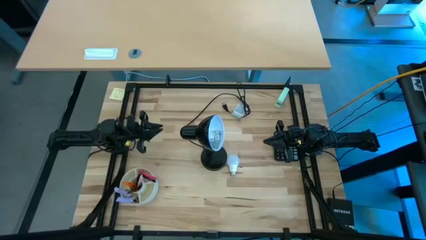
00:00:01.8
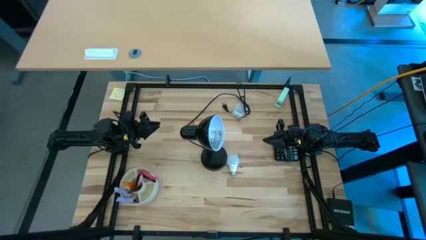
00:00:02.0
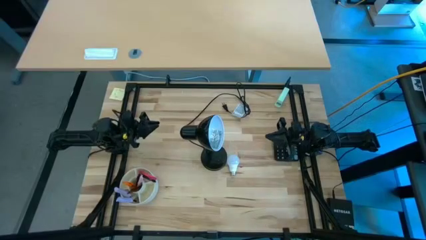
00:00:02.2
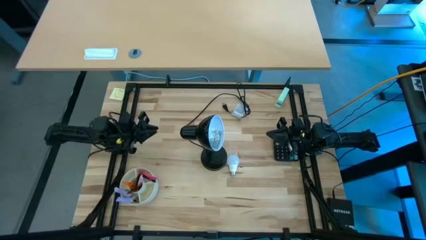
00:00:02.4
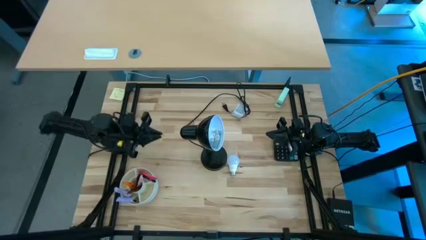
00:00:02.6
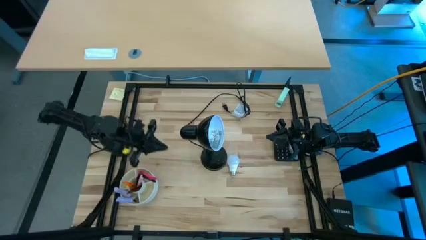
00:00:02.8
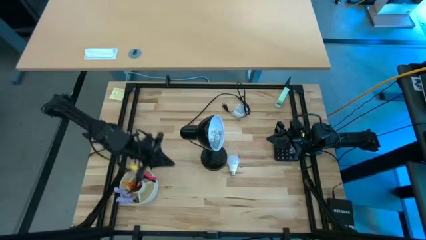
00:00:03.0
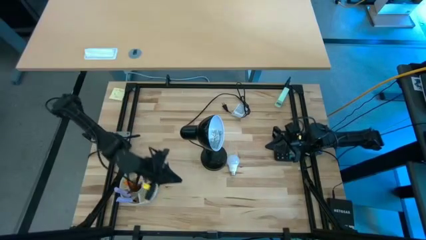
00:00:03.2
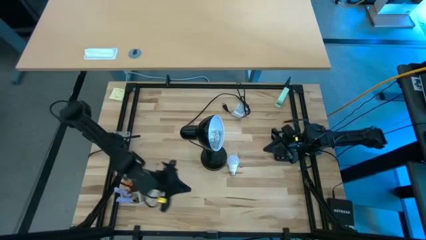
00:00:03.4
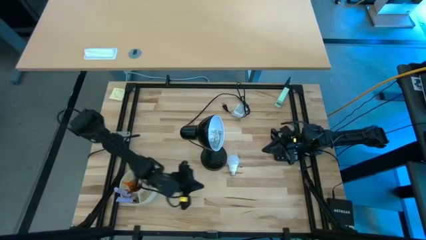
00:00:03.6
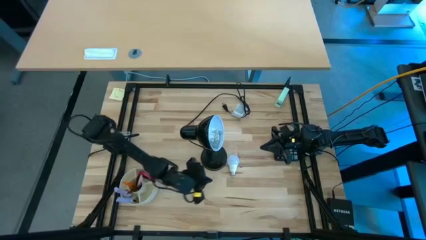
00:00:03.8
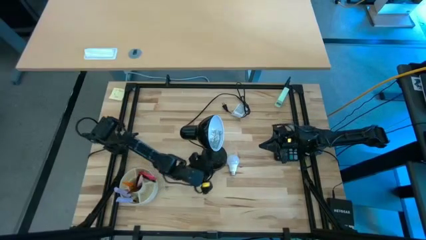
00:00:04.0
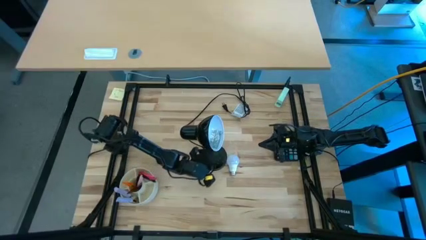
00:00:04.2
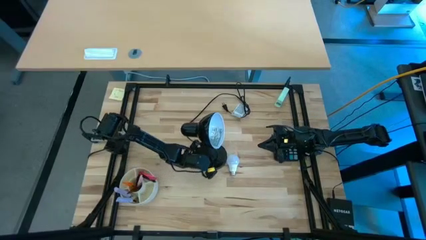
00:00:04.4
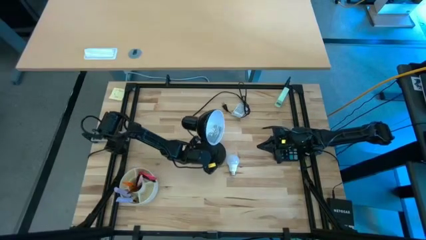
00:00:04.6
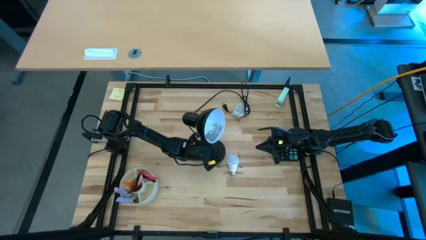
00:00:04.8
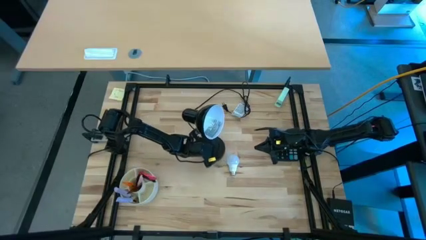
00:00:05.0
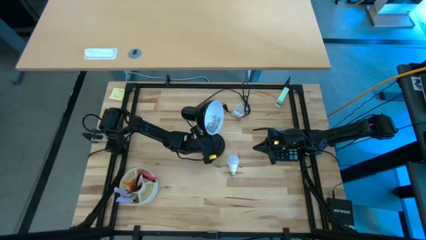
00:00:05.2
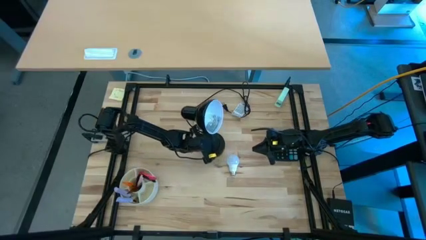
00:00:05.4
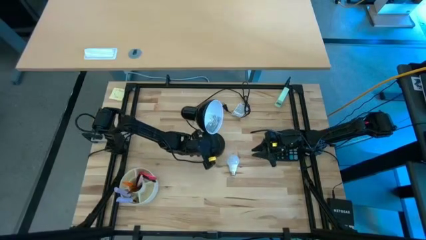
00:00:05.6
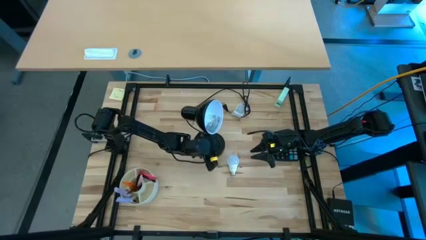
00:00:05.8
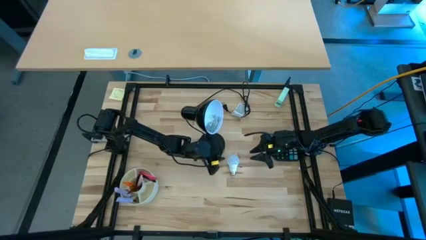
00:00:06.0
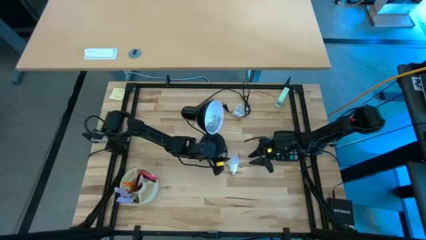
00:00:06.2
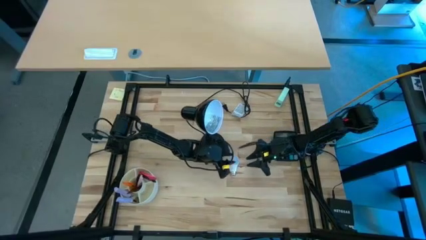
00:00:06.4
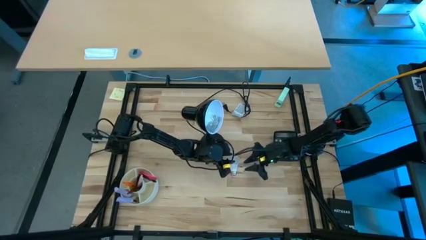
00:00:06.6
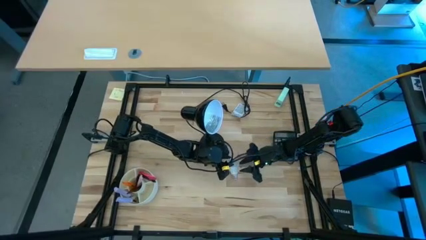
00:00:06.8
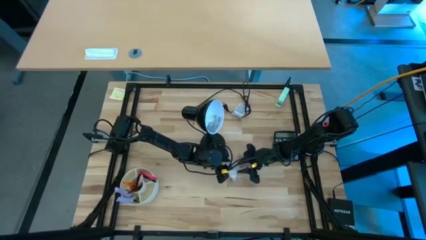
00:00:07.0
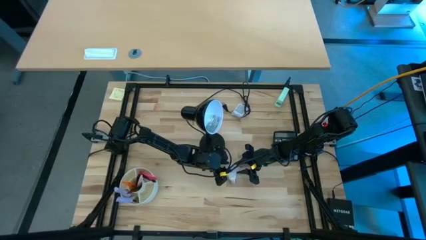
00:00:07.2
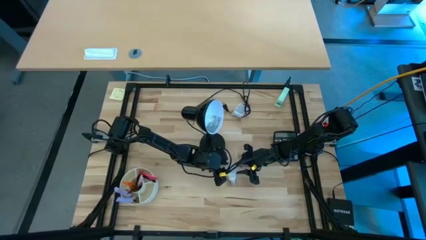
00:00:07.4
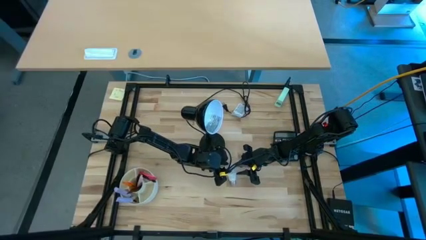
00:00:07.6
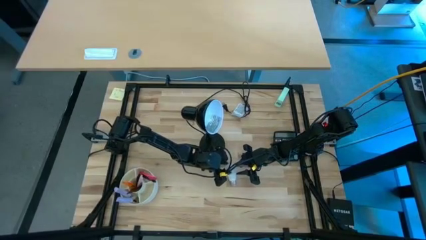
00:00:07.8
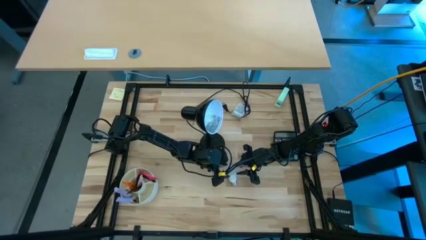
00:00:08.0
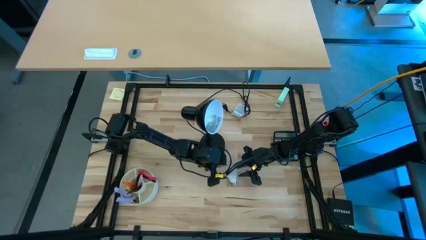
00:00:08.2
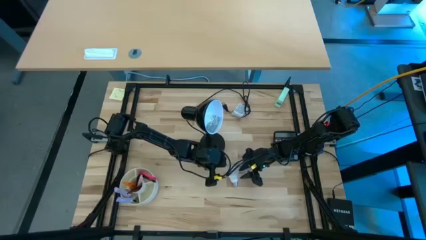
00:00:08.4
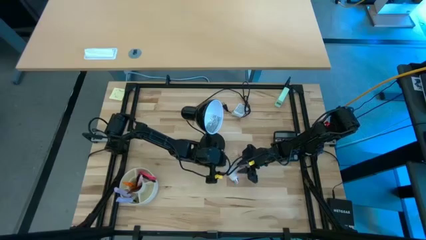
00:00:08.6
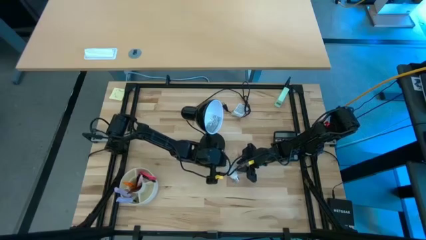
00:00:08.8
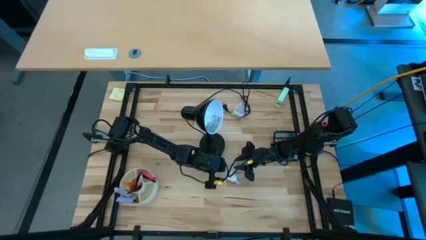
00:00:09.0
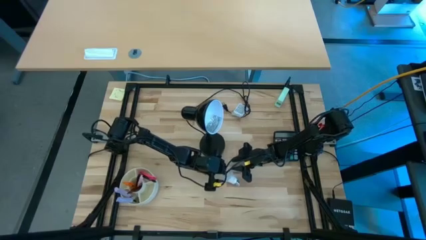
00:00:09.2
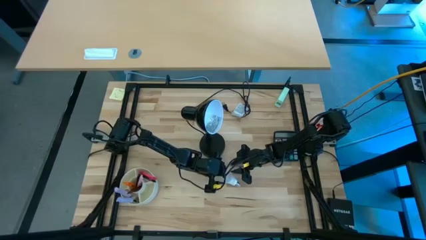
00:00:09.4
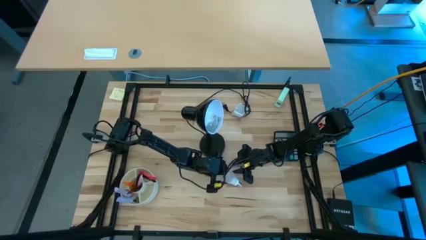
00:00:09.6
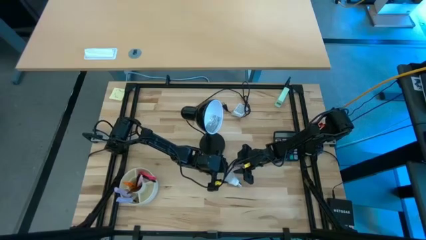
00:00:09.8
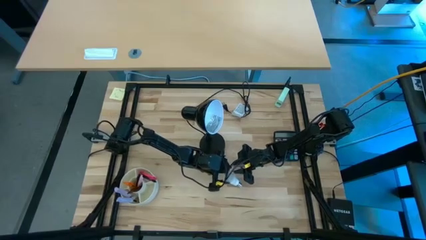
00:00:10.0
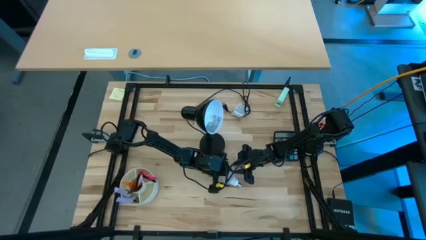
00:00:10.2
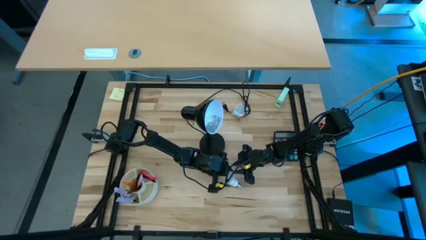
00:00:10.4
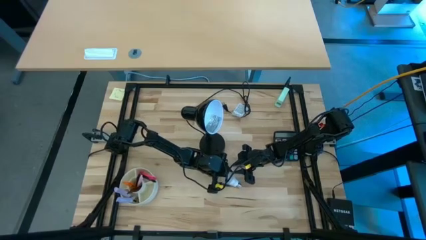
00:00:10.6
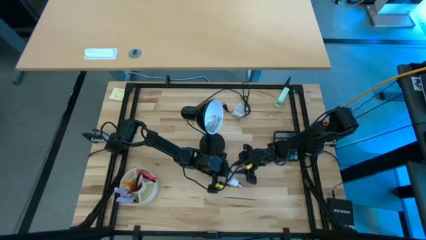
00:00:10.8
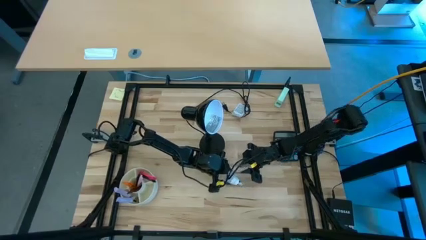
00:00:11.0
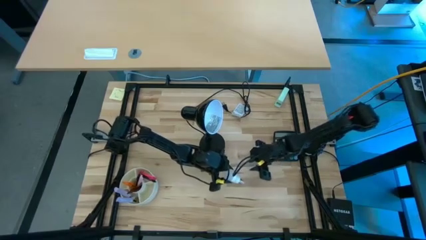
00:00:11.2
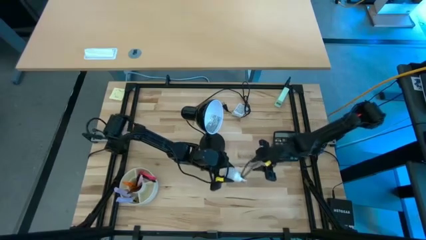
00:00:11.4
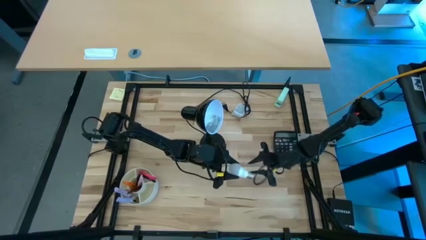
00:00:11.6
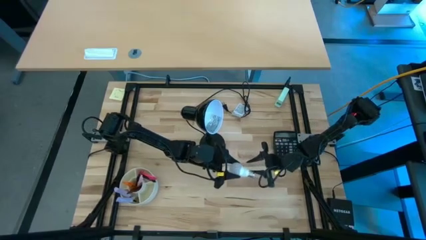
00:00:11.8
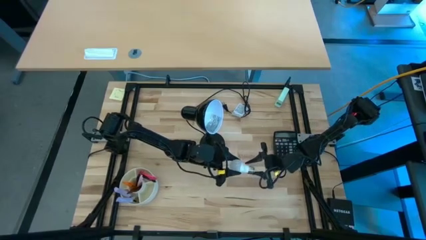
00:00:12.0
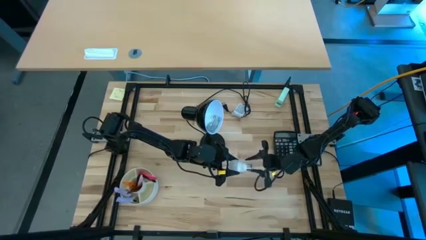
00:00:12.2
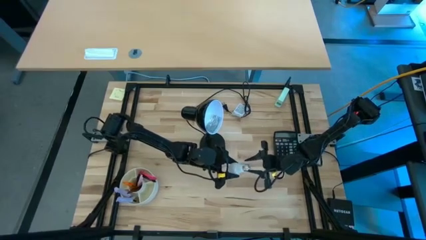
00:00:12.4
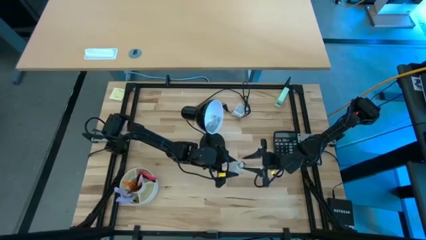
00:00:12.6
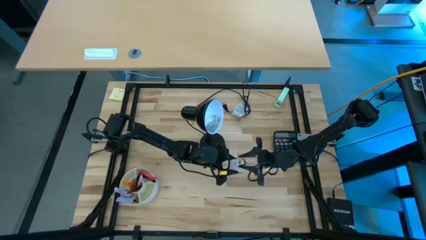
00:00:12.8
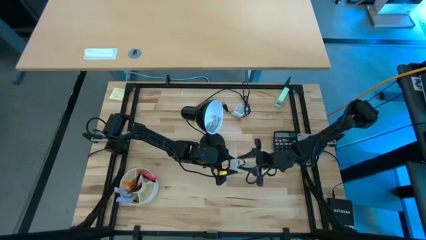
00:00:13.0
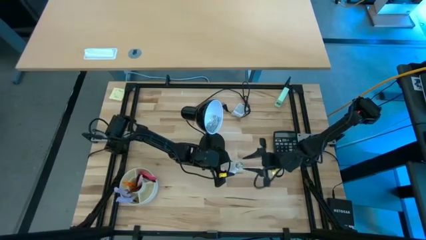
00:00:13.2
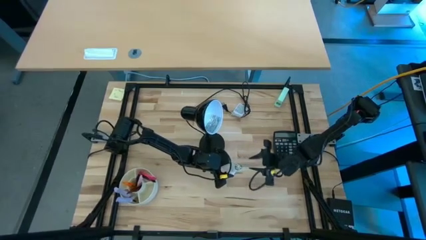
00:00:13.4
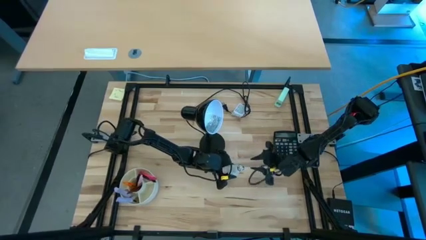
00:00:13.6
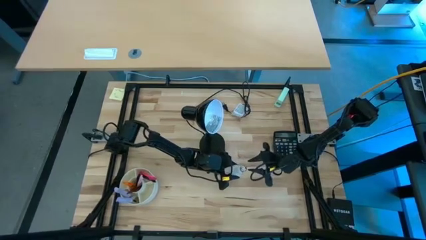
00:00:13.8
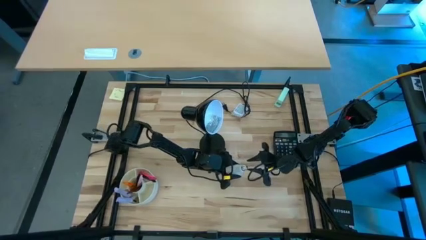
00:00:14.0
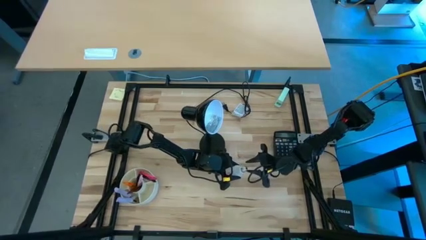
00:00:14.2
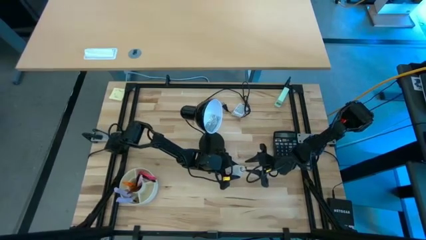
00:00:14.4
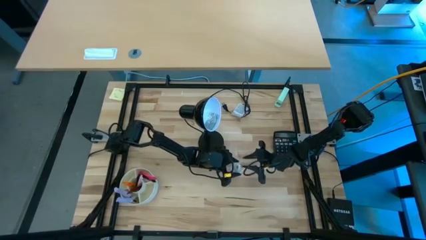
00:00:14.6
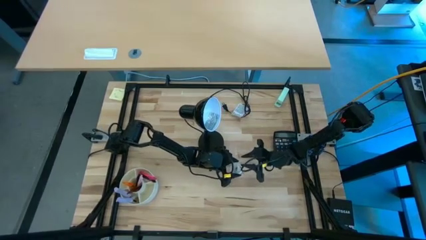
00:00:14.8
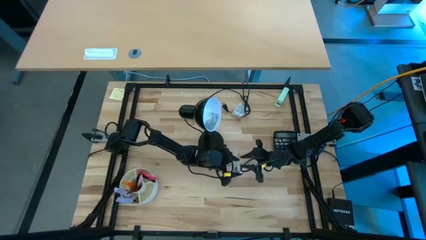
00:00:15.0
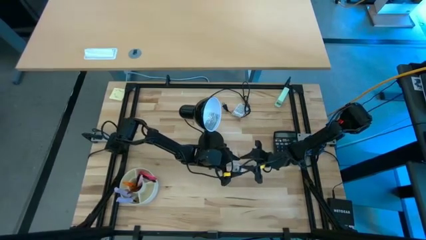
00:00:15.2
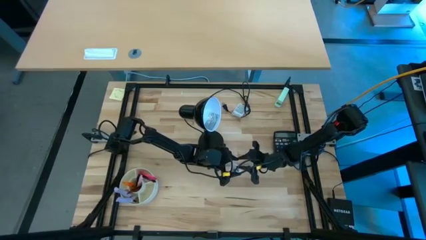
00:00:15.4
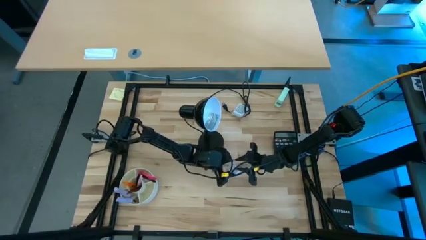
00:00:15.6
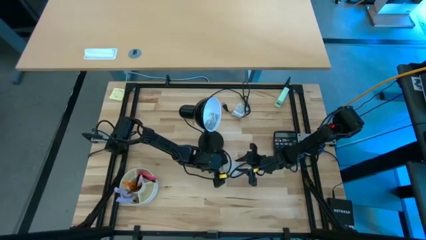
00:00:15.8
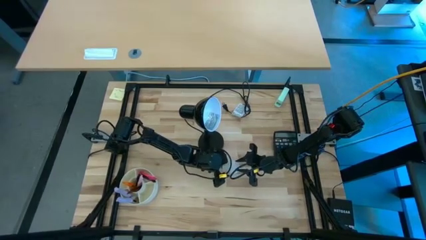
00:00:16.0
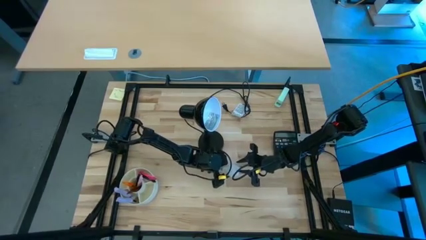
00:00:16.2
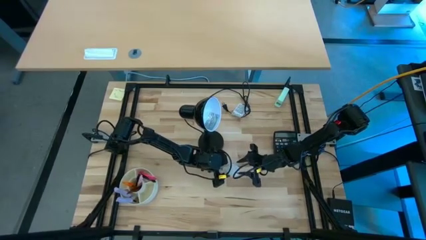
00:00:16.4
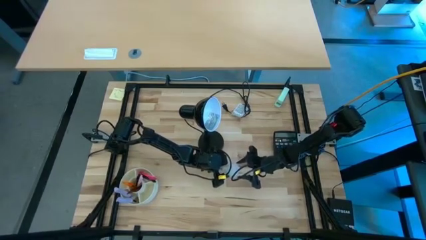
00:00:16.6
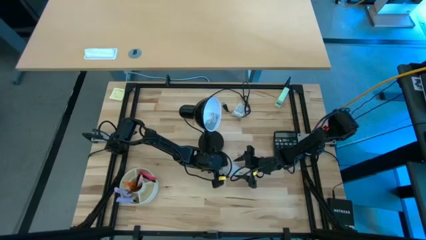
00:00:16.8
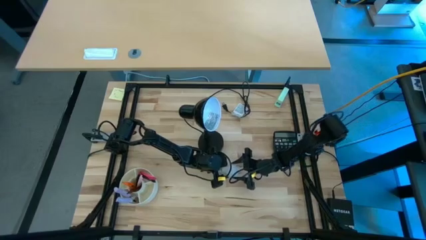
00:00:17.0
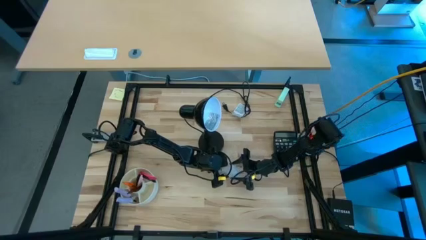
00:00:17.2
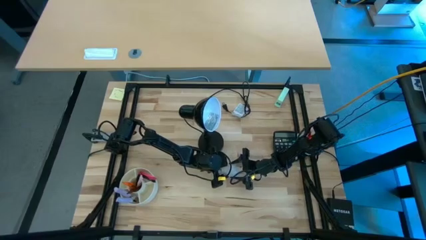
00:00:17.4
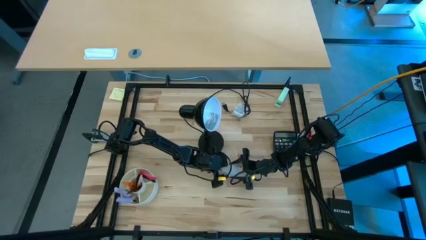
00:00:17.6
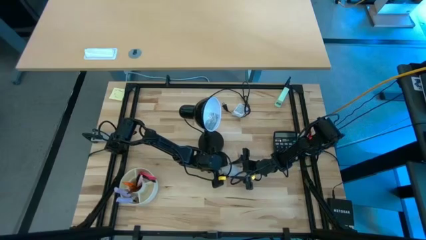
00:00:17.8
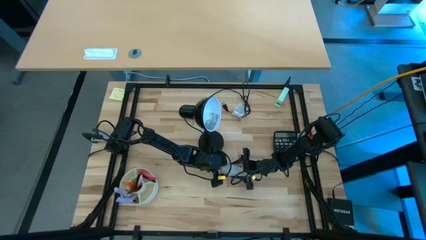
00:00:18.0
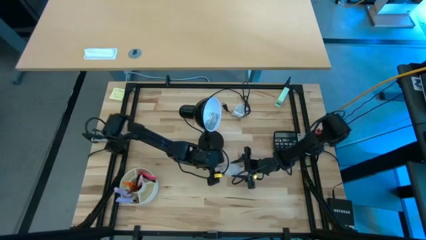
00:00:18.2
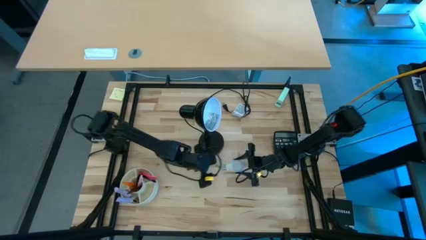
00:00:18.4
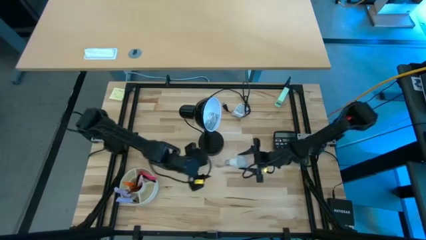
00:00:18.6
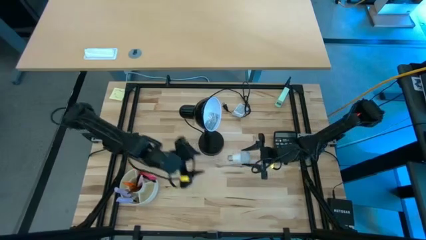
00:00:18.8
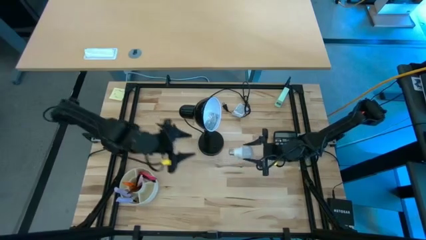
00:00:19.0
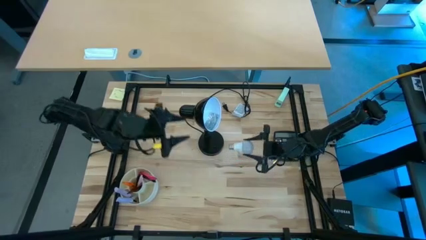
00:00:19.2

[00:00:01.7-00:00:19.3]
Task: Screw lightbulb
Insert the white lightbulb into the black desk lamp
